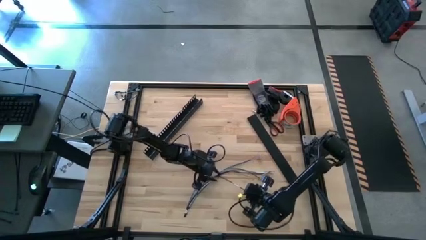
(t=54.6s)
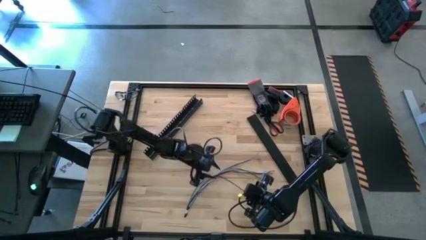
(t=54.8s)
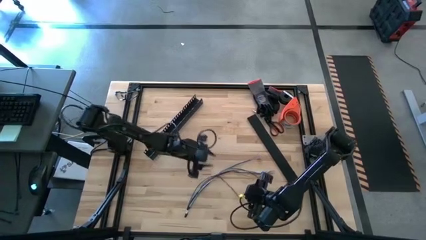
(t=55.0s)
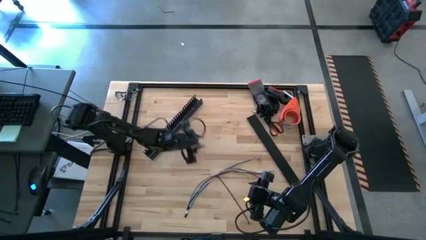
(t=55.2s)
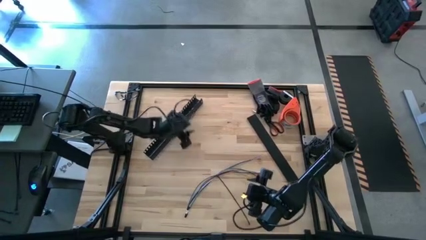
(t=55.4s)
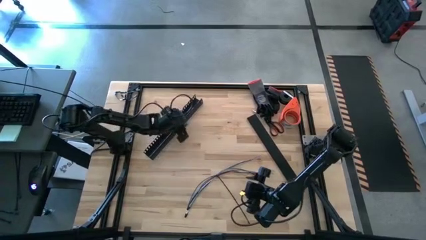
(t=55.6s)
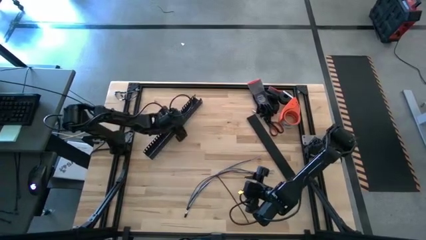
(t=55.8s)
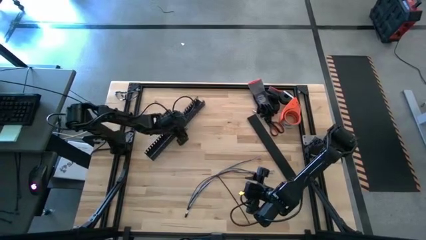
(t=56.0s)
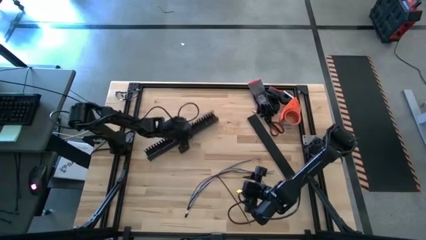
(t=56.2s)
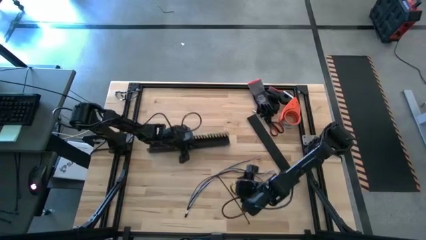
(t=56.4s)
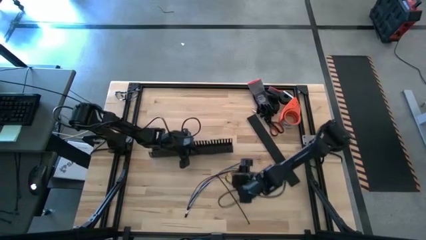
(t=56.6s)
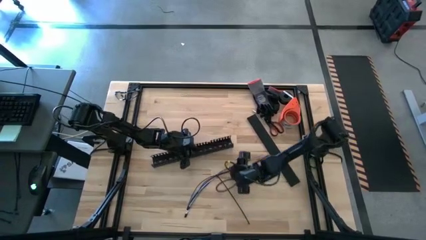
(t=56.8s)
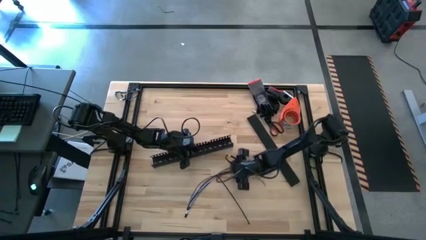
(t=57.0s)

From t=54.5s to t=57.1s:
Task: Ziptie cables
Move the black cable duct to the center of the table

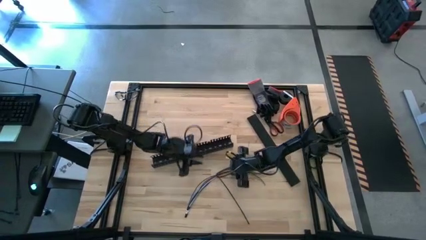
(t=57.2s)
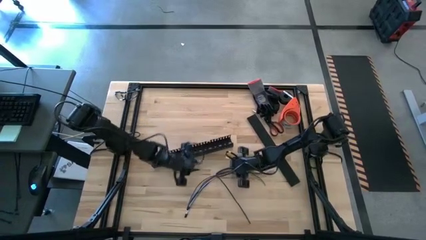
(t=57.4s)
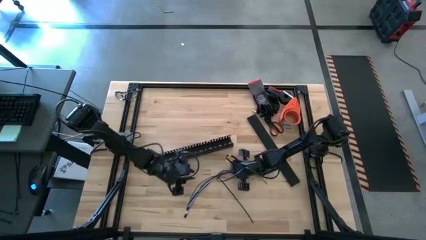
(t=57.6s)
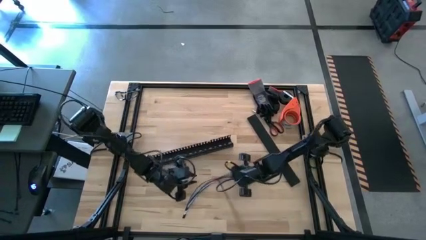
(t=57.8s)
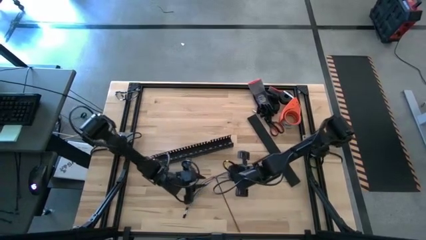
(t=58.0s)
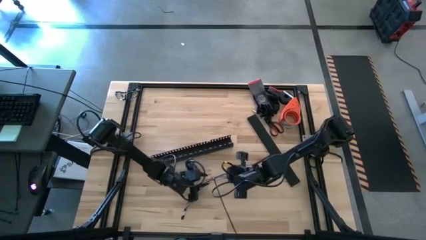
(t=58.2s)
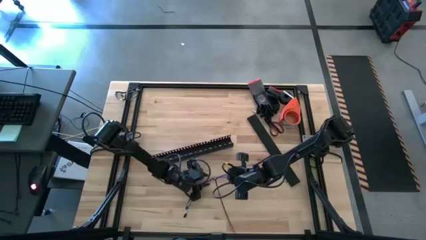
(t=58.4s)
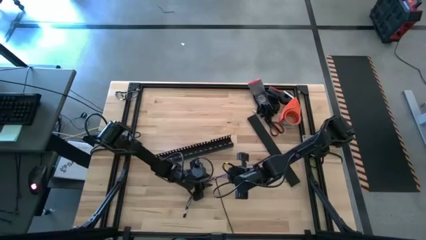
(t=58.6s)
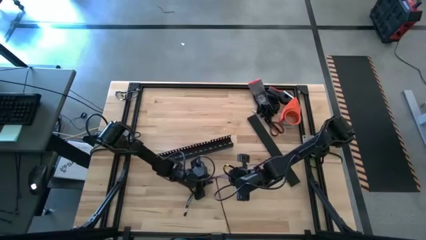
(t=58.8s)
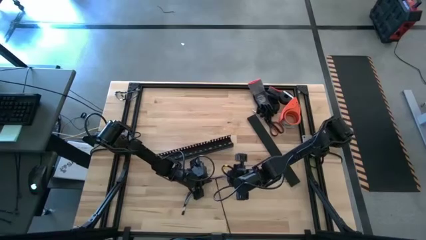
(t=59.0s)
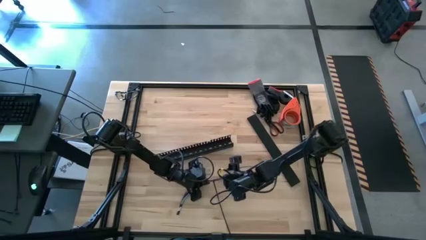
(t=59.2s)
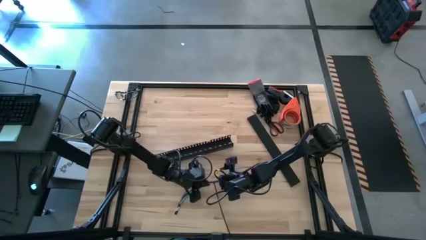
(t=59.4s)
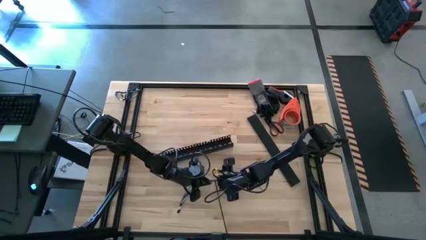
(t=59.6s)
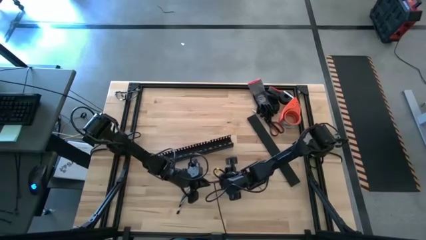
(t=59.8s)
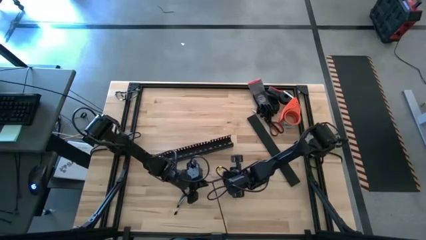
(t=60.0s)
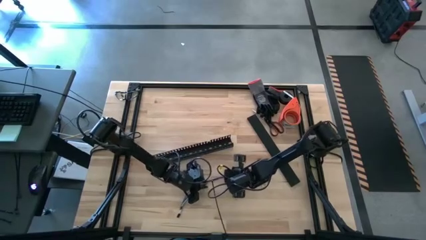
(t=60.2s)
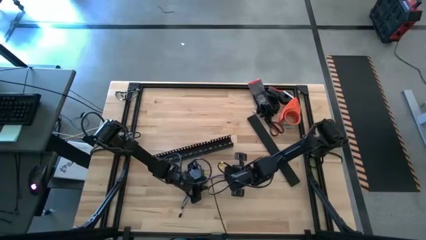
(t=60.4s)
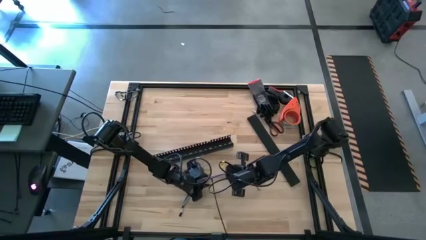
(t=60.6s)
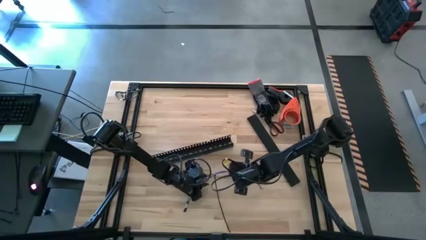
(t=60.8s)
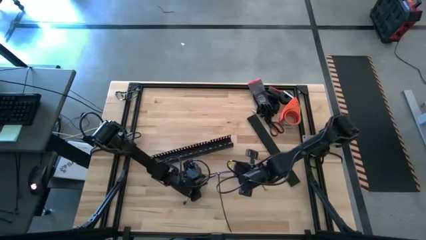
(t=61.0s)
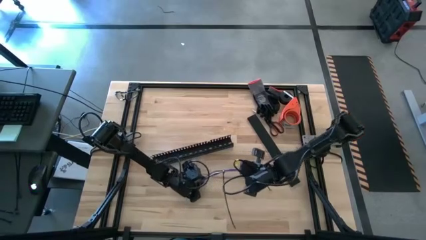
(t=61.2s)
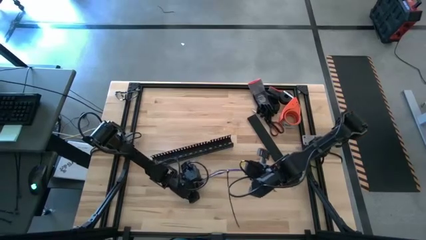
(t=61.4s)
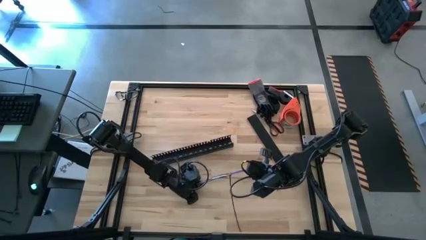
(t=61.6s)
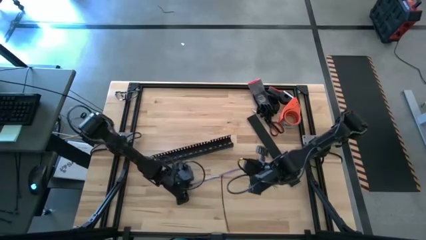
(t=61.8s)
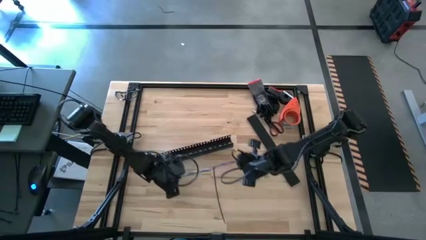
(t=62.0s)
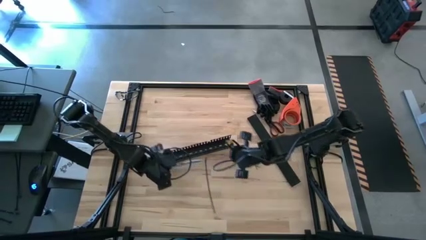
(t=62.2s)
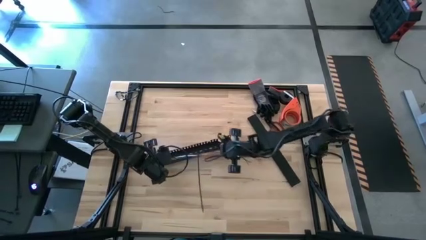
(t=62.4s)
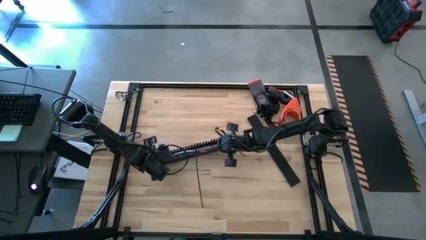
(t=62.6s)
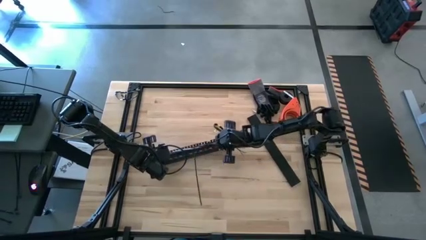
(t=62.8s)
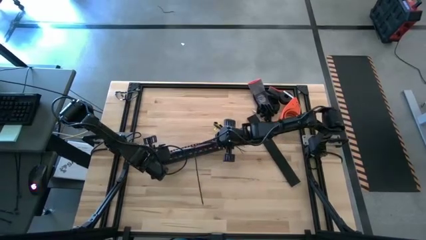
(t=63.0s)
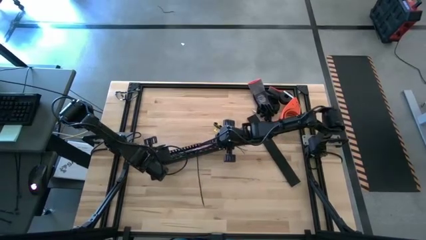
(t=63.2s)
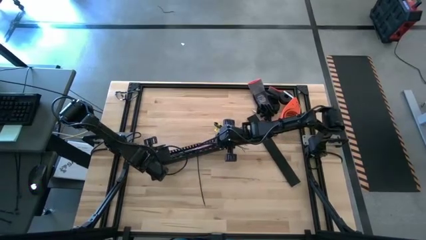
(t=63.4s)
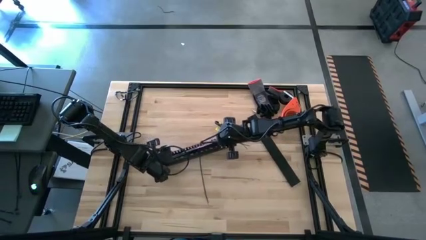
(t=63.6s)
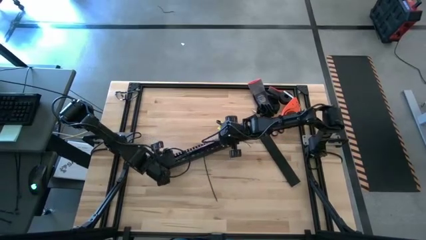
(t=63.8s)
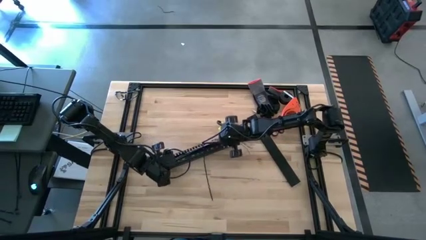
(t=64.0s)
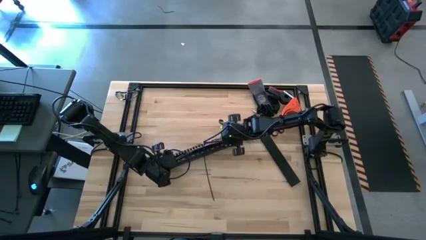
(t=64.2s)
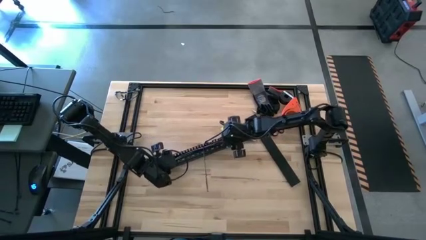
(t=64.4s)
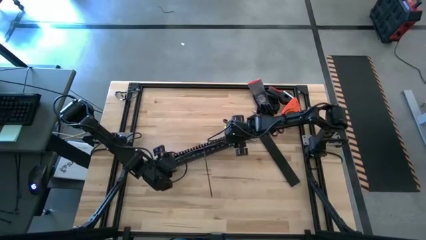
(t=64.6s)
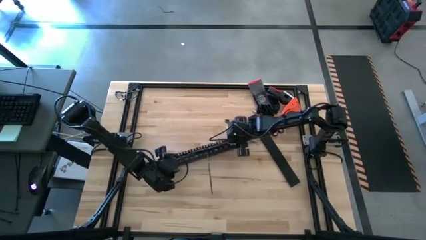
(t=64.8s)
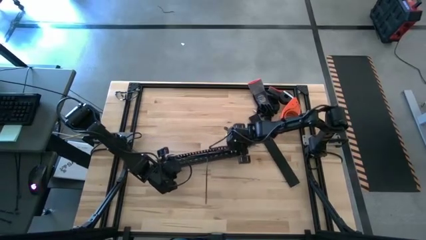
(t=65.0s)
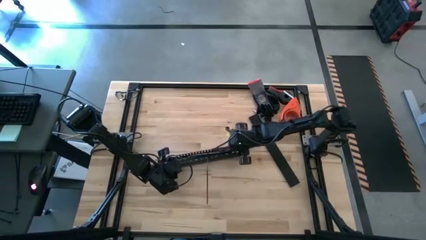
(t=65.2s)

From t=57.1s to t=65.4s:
Insert the zip-tied cables into the black cable duct
